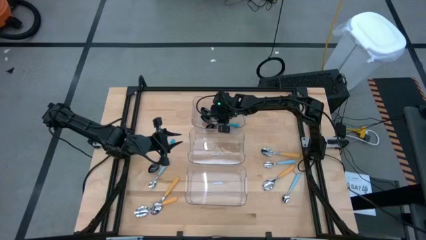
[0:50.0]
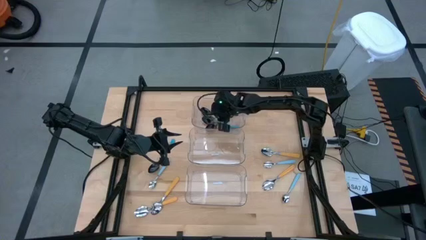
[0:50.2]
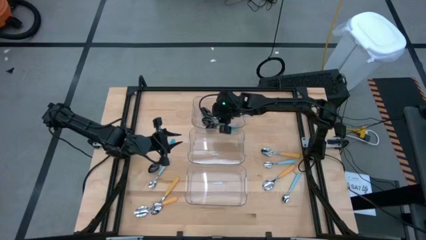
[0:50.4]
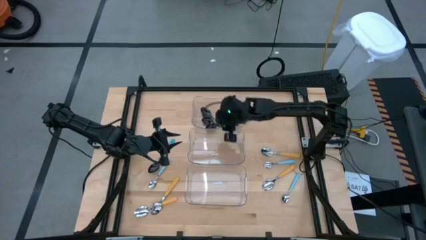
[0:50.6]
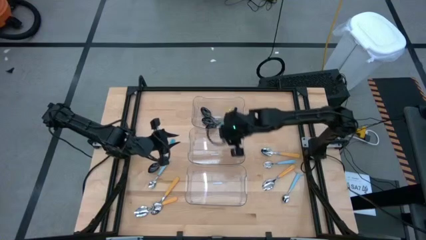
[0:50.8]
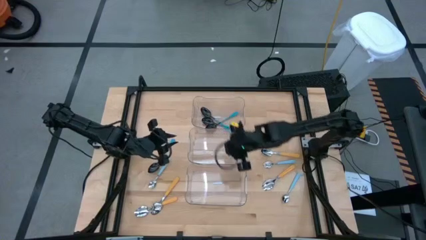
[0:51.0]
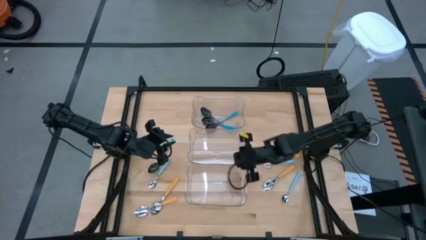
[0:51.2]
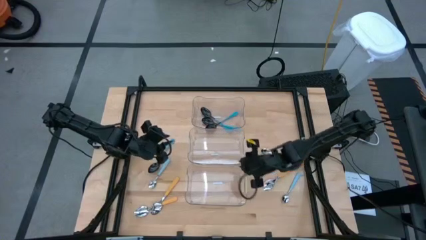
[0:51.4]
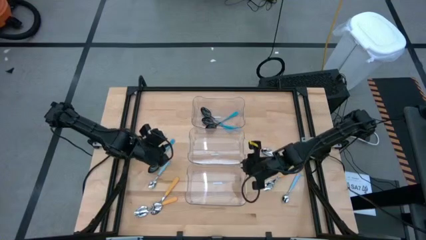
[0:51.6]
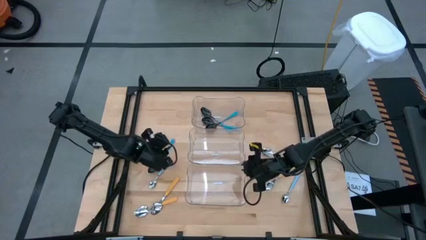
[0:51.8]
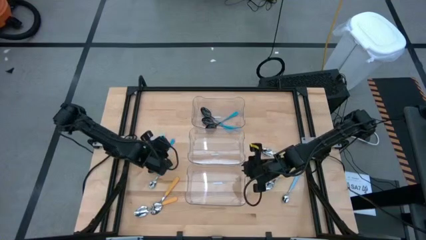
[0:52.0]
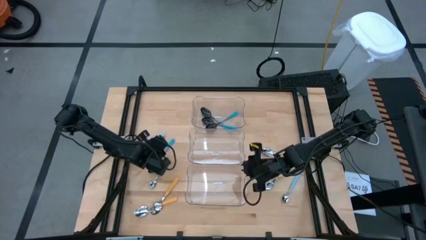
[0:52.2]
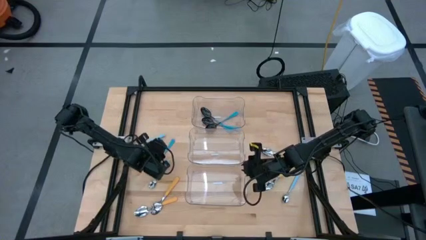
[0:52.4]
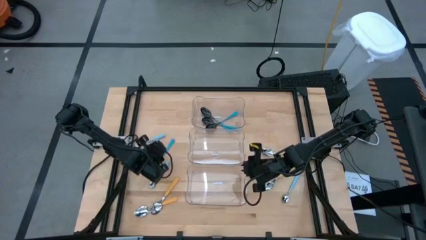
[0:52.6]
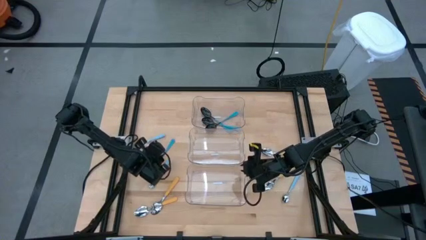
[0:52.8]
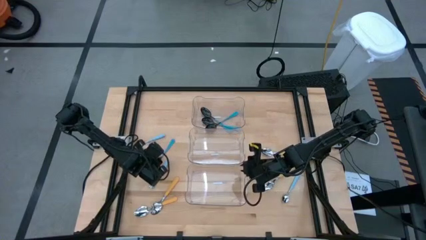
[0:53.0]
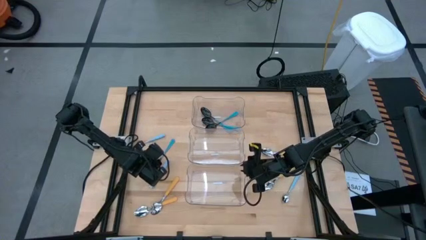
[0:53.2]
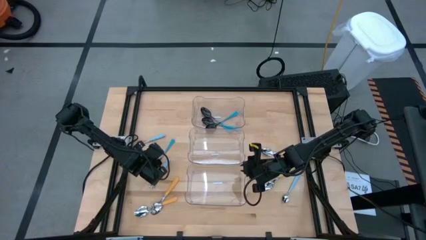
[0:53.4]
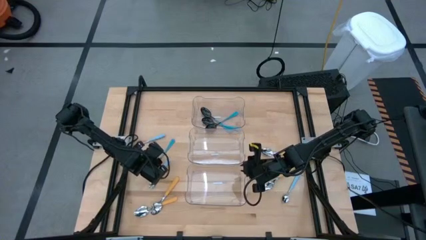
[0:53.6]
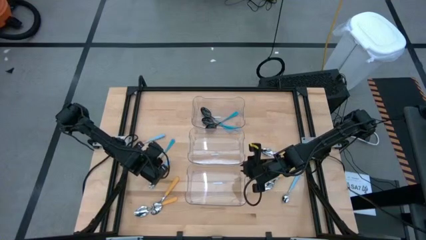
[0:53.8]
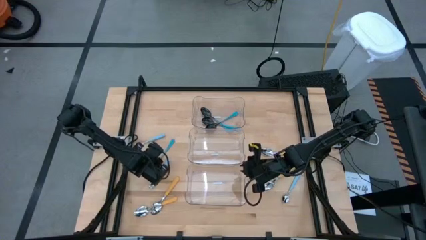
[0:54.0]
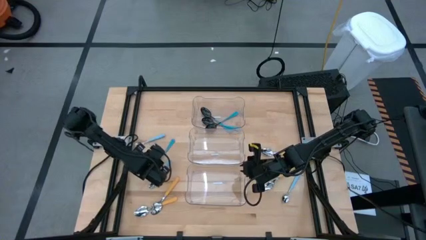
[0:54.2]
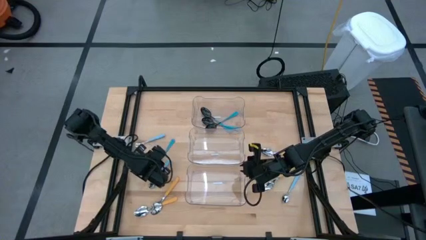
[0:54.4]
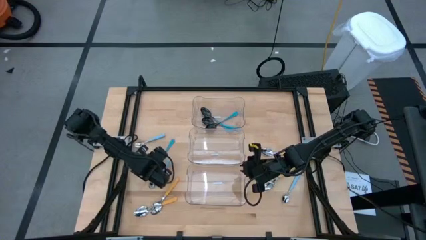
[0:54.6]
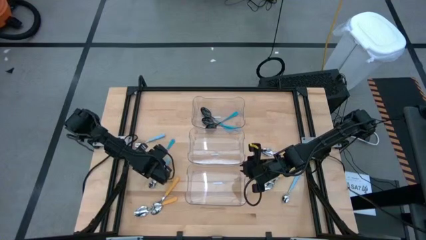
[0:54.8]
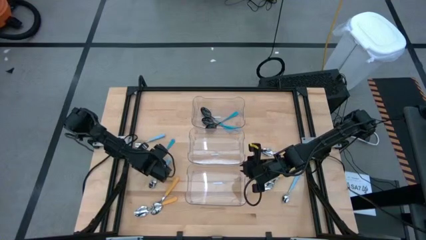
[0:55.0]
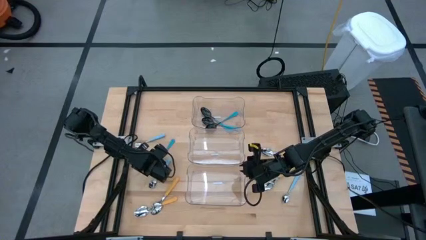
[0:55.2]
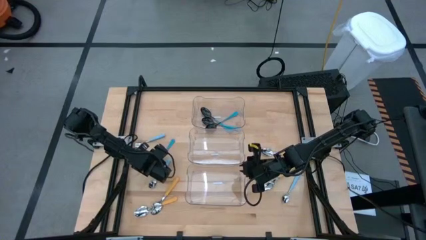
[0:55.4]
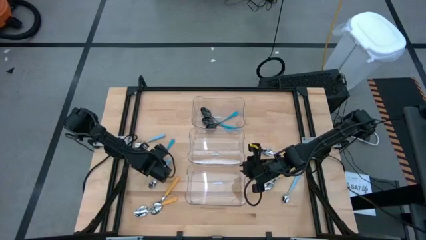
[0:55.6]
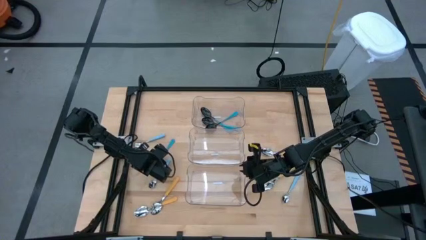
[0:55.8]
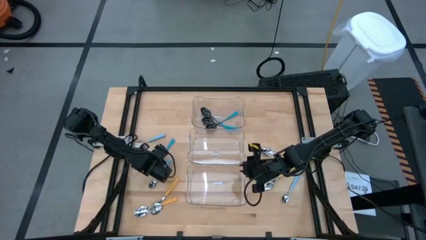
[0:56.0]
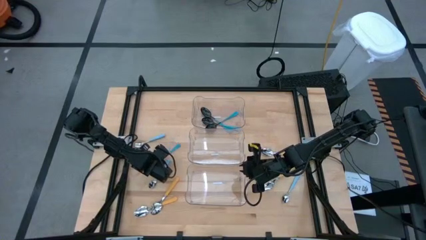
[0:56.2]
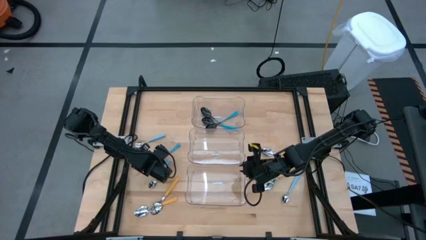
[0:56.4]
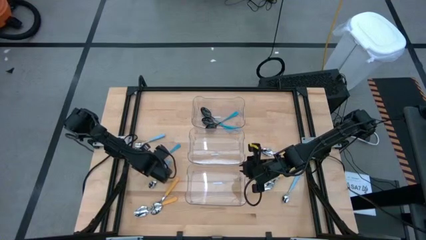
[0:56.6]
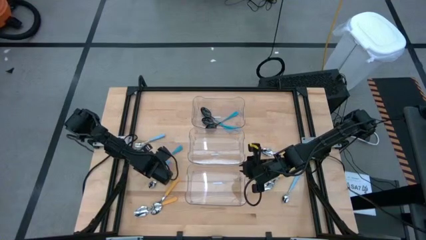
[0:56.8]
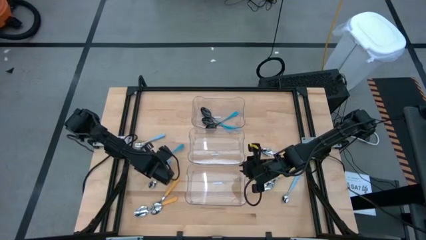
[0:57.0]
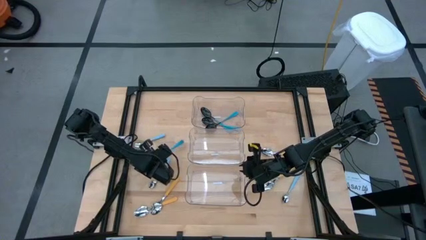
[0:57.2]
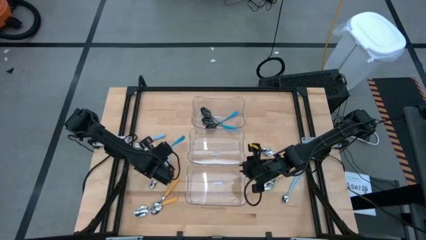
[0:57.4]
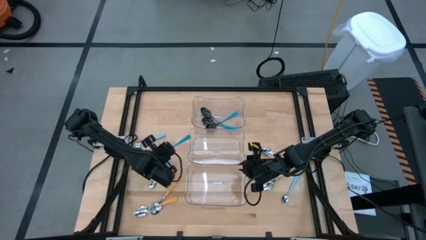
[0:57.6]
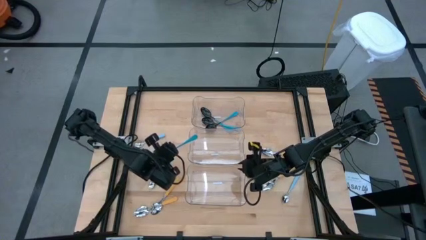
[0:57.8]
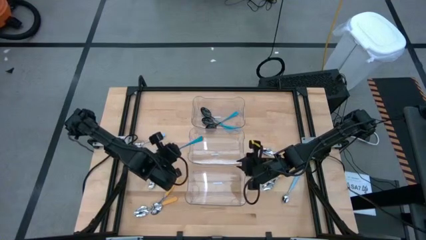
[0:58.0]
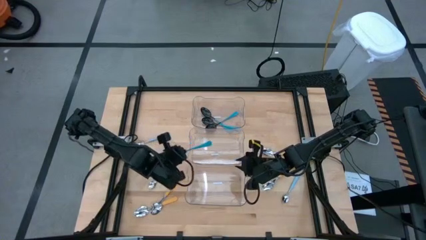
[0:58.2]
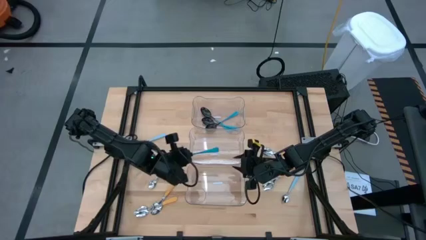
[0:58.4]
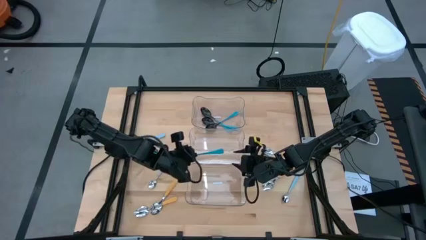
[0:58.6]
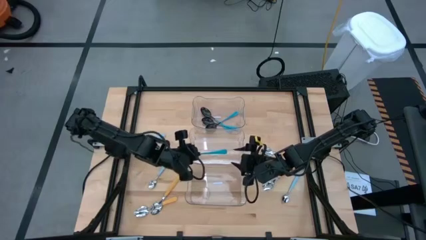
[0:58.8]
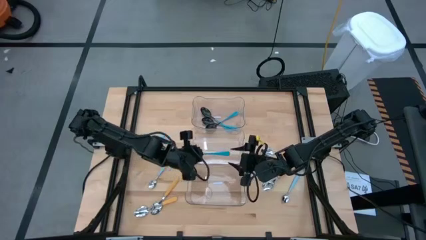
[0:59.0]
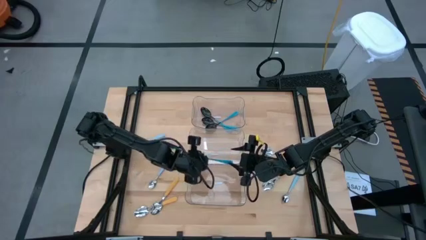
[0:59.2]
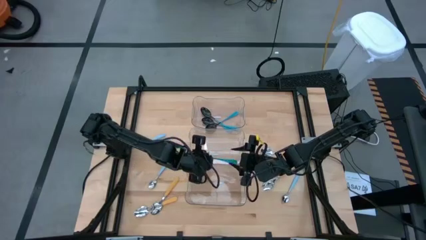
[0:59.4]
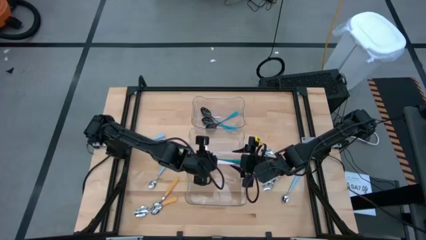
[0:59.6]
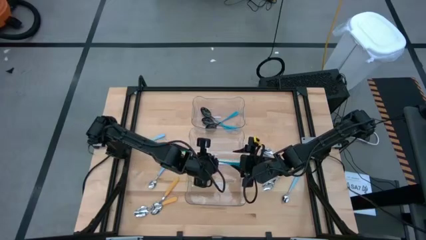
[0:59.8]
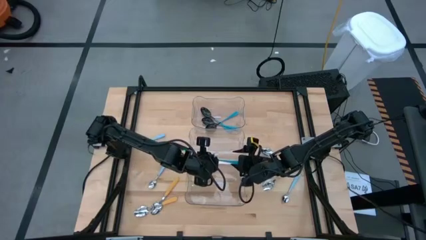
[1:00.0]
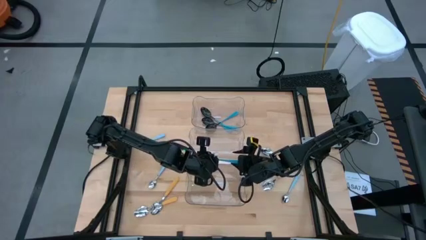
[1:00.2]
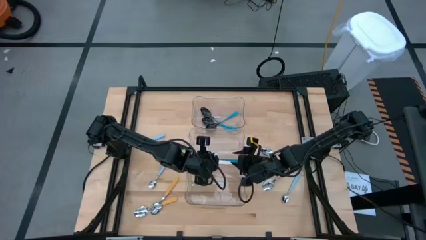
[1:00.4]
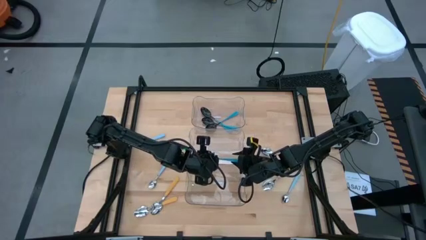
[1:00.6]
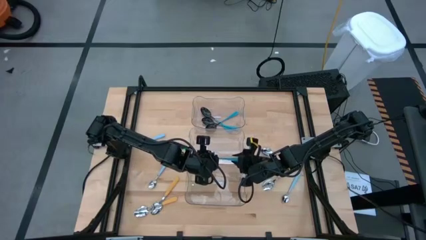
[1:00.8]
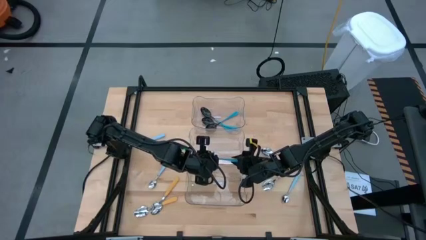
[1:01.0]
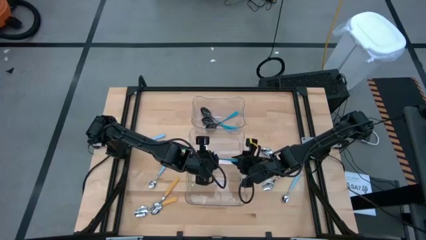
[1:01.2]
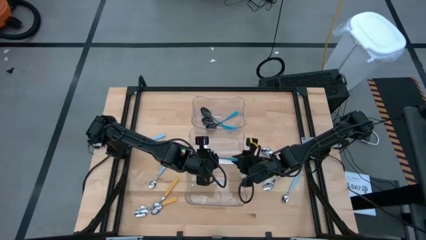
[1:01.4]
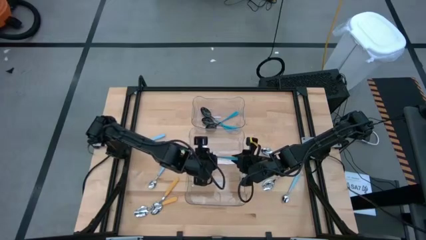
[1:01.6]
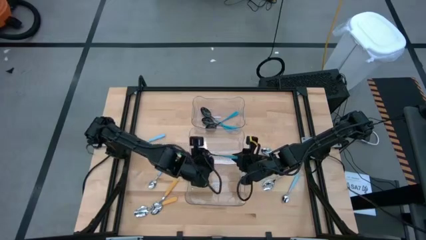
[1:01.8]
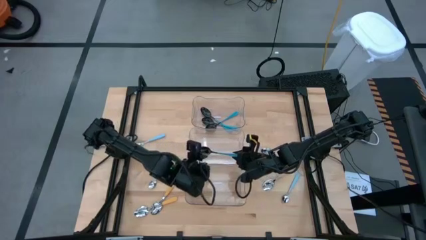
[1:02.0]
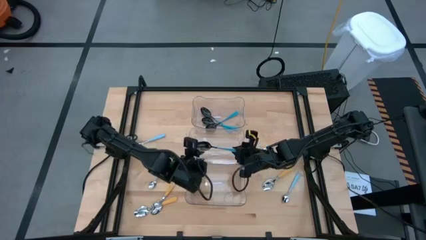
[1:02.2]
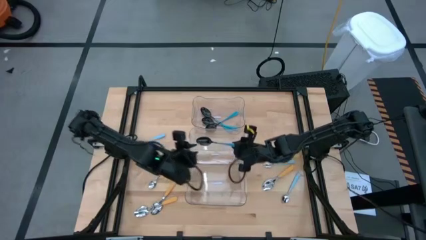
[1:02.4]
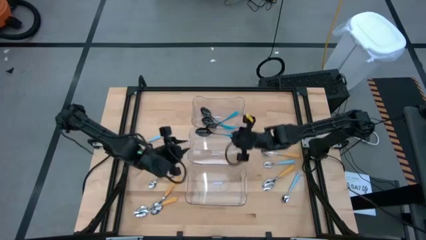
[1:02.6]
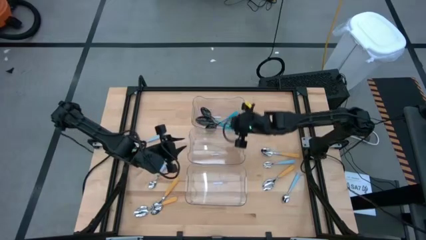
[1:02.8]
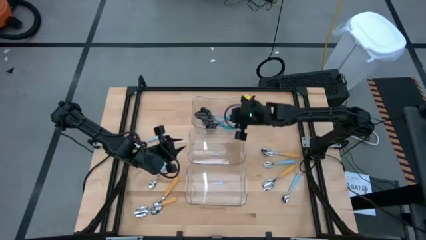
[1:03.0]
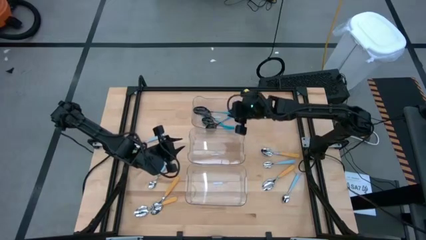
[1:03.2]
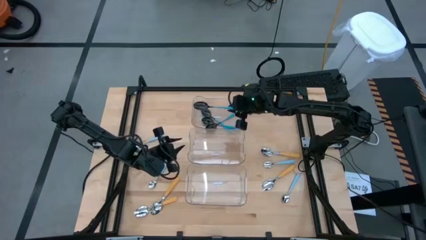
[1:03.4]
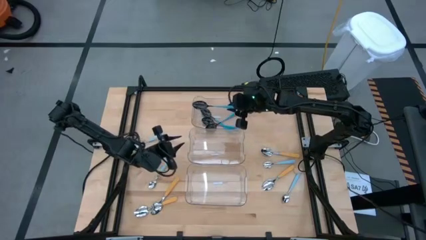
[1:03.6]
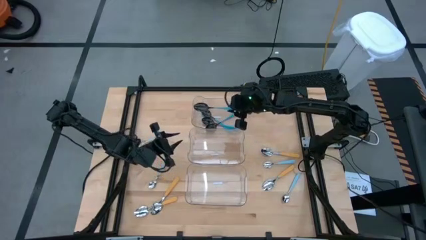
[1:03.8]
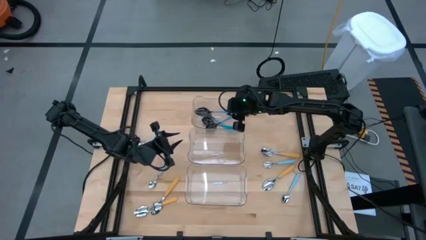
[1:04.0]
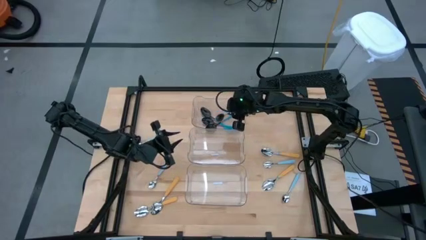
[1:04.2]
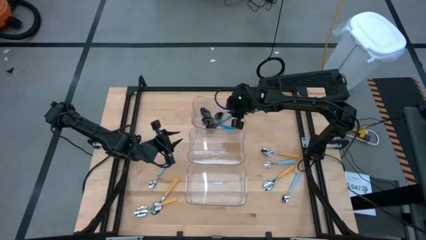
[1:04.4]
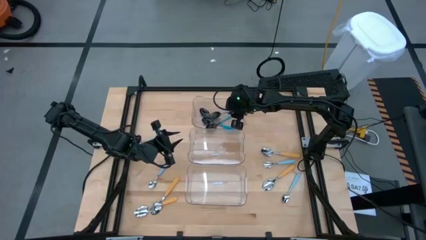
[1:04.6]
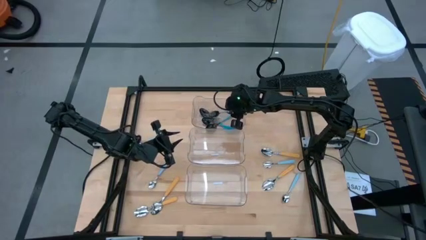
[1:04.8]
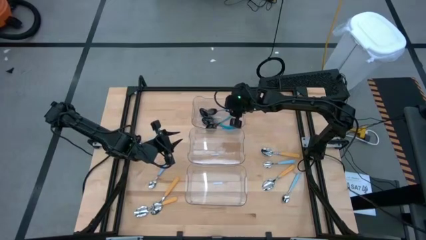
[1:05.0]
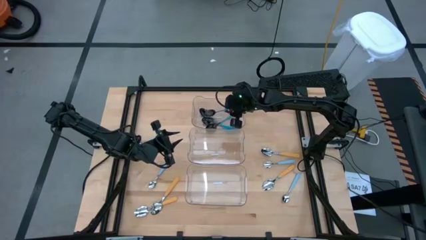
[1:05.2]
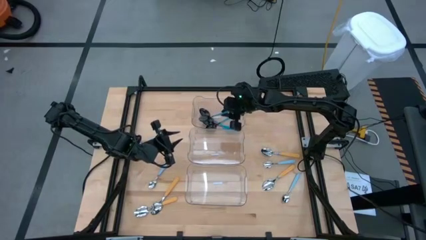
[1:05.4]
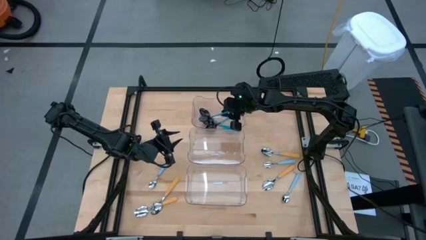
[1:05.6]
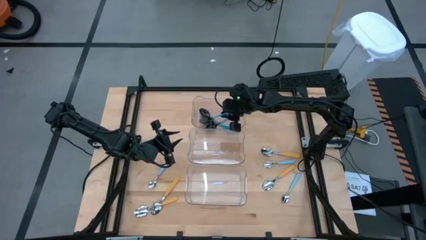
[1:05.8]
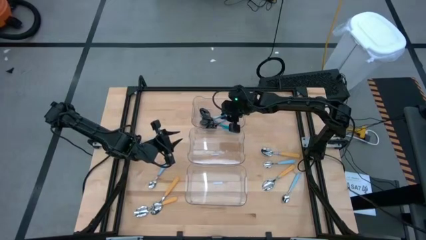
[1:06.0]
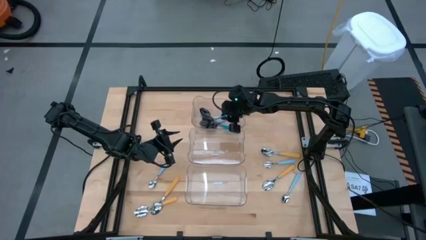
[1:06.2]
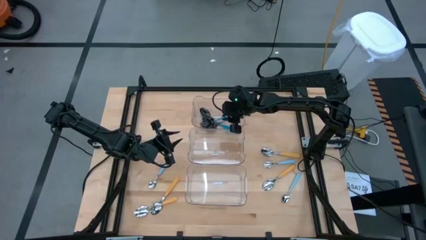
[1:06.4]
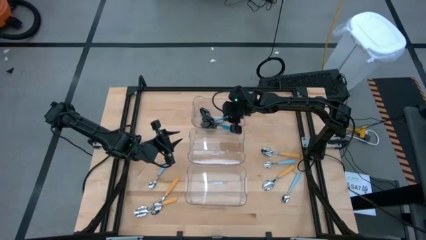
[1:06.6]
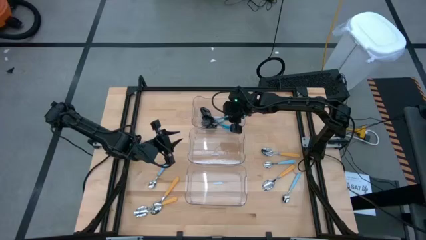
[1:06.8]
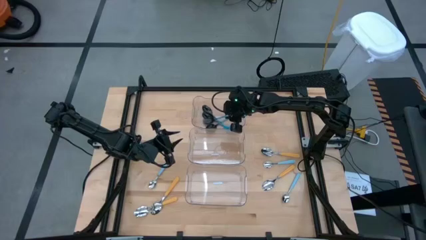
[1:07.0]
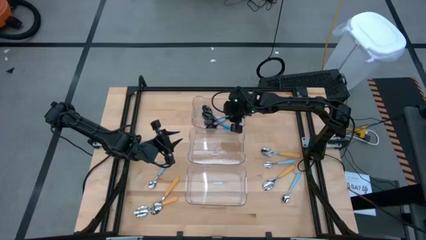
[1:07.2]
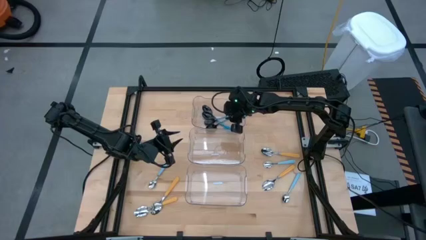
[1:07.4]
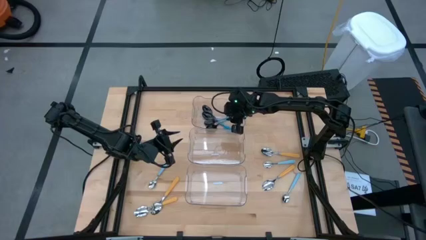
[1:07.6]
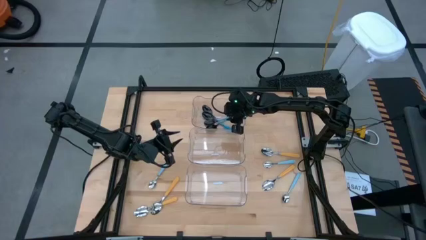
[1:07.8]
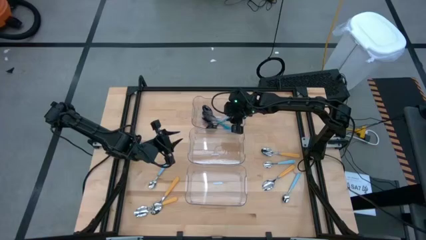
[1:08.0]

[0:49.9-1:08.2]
Task: Sort silverware by color (type)
Put the dark blue spoon into the top transparent bin
